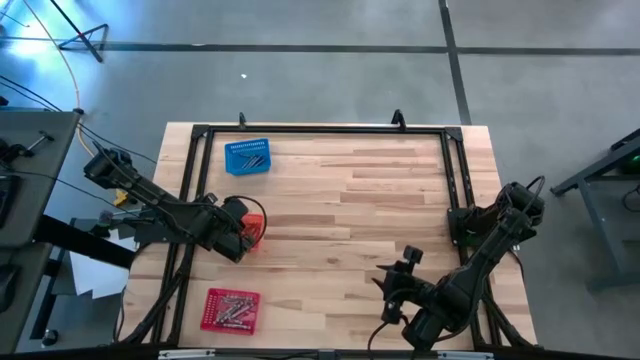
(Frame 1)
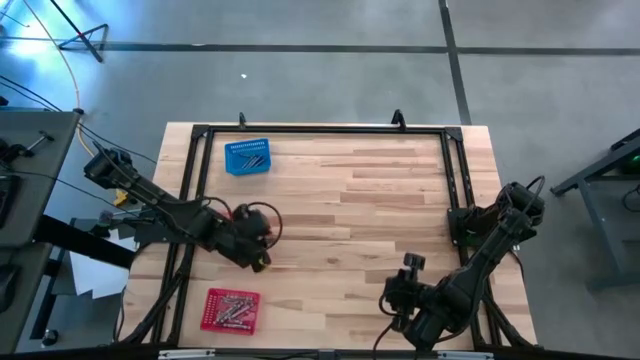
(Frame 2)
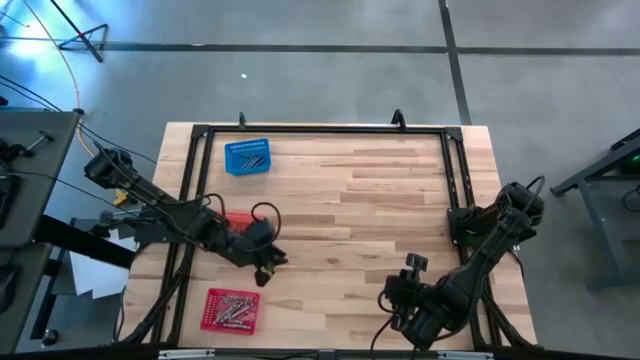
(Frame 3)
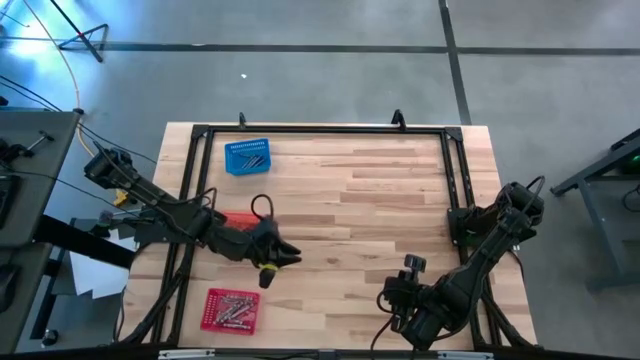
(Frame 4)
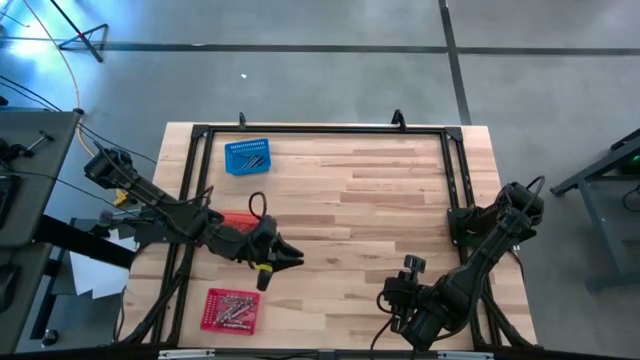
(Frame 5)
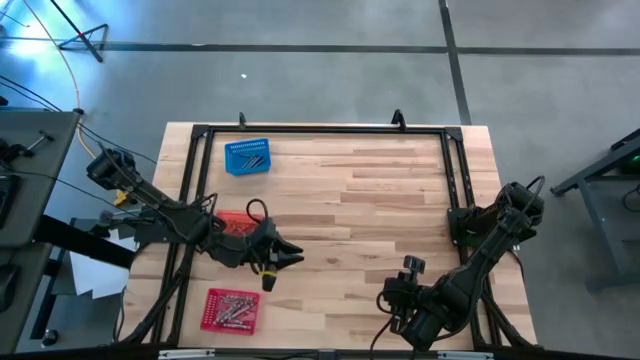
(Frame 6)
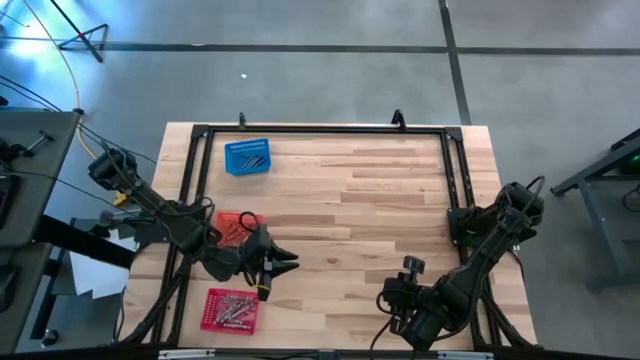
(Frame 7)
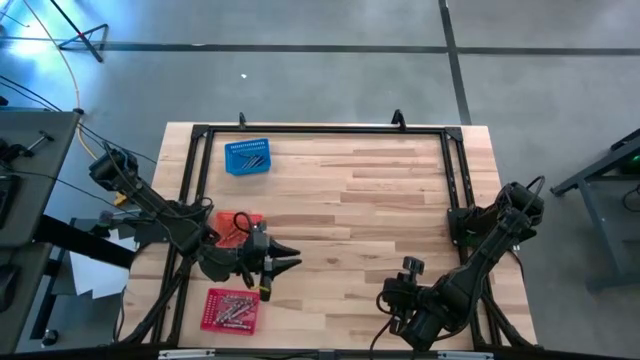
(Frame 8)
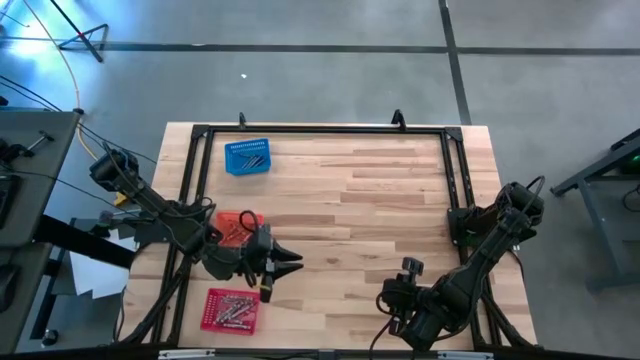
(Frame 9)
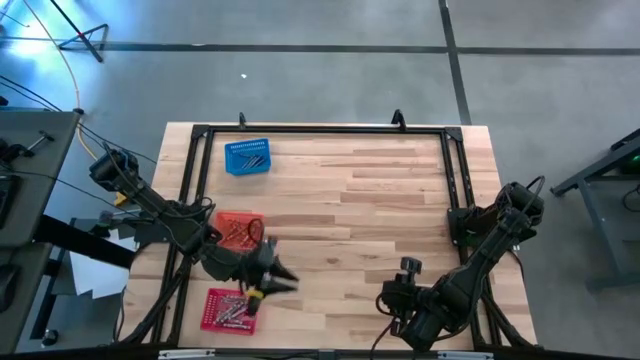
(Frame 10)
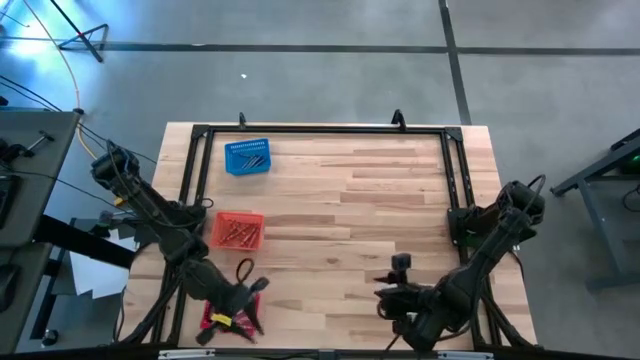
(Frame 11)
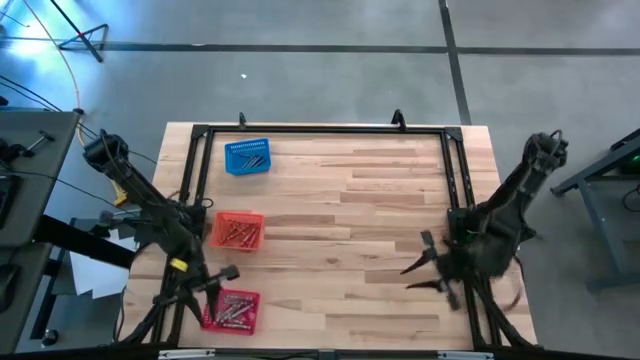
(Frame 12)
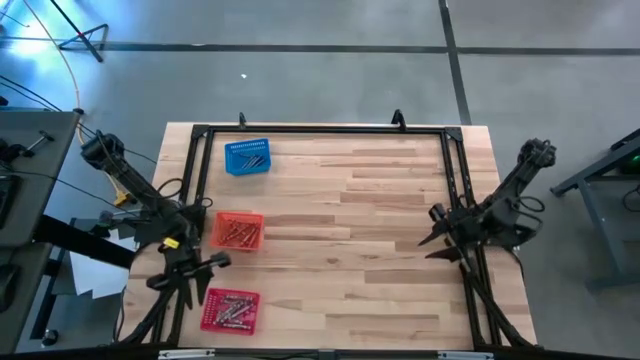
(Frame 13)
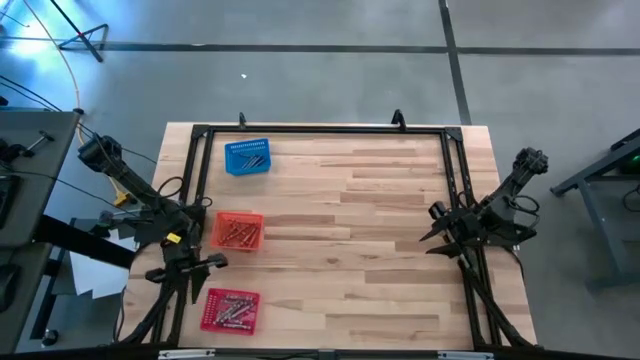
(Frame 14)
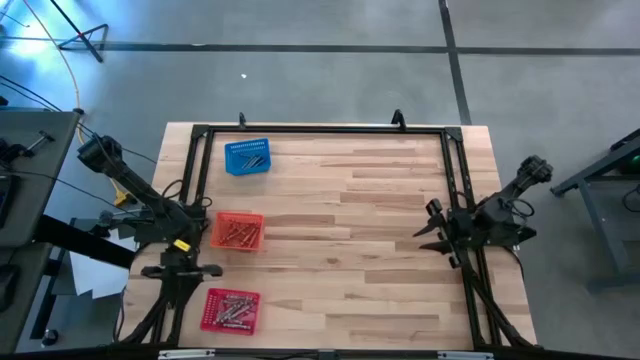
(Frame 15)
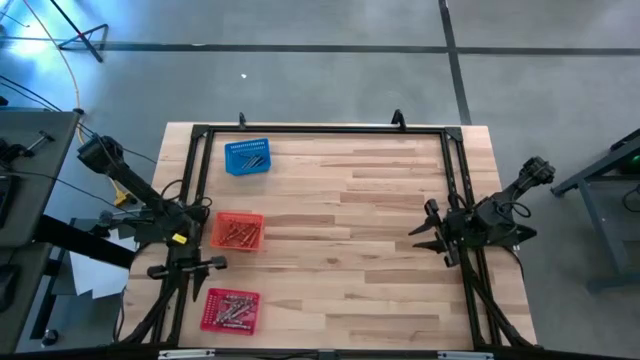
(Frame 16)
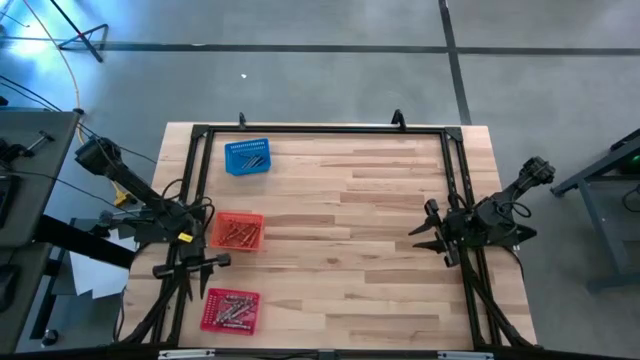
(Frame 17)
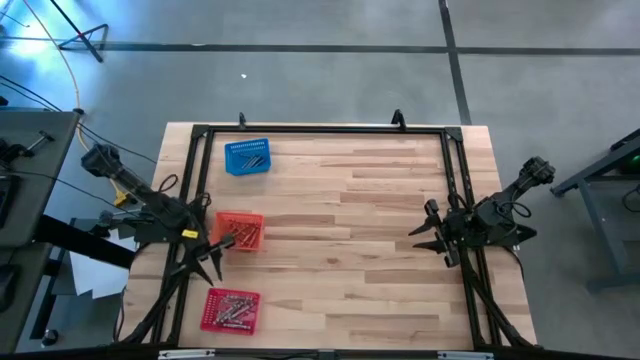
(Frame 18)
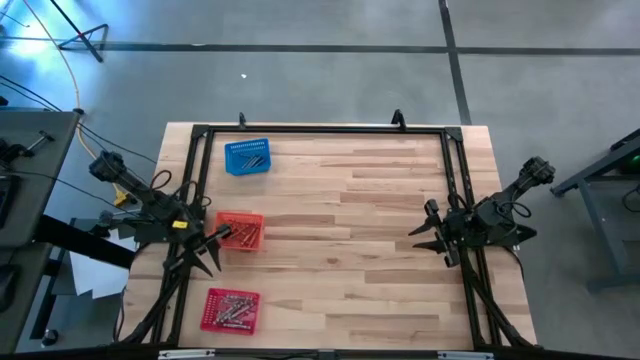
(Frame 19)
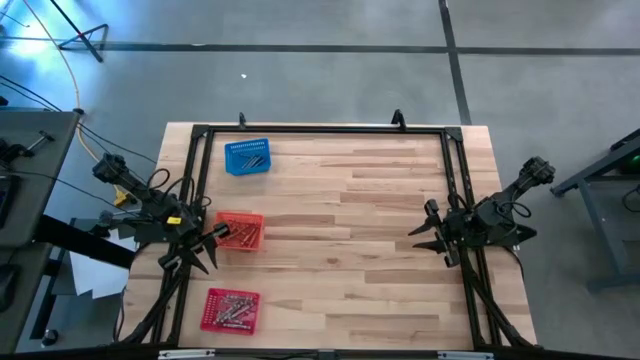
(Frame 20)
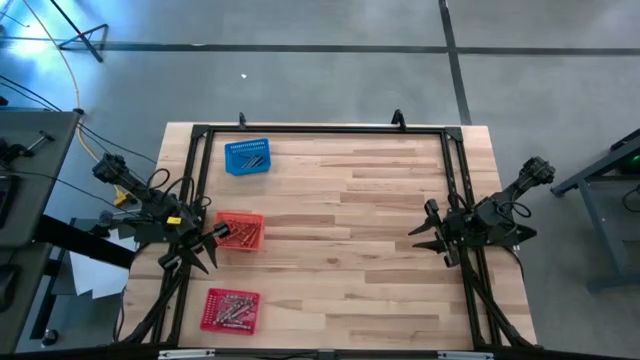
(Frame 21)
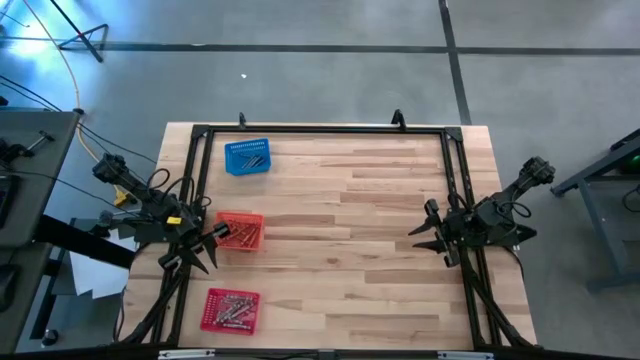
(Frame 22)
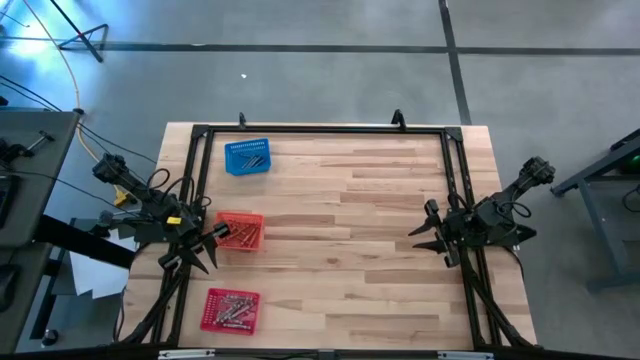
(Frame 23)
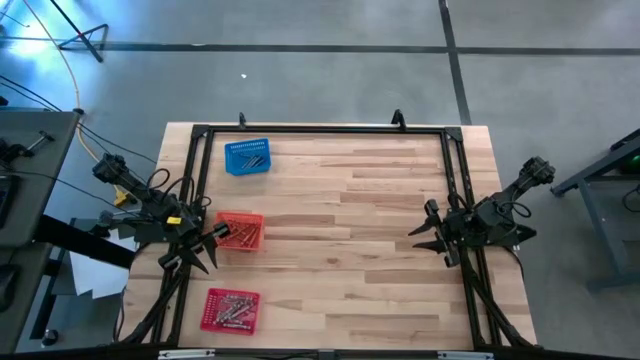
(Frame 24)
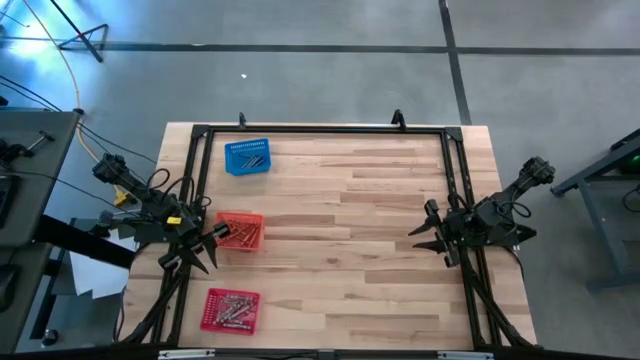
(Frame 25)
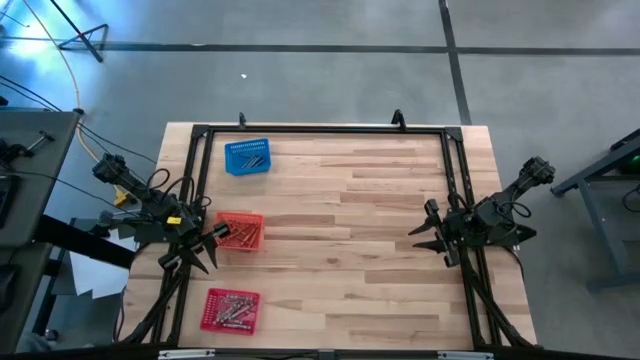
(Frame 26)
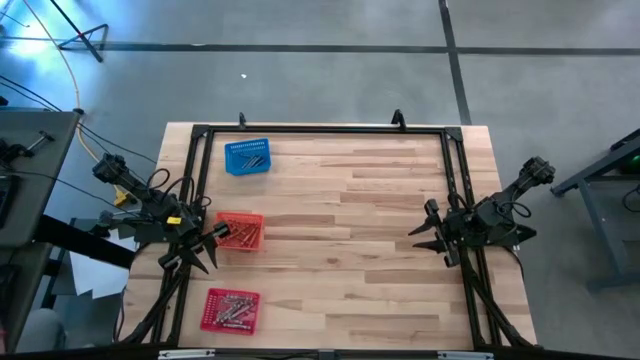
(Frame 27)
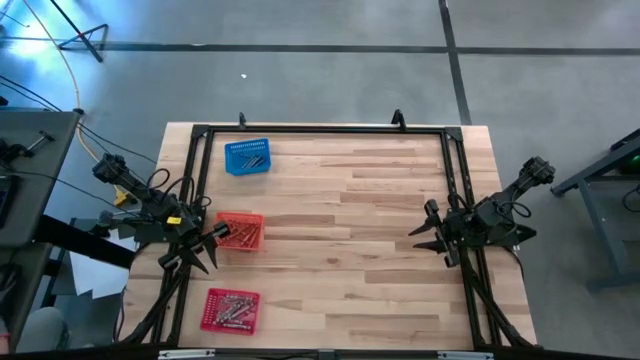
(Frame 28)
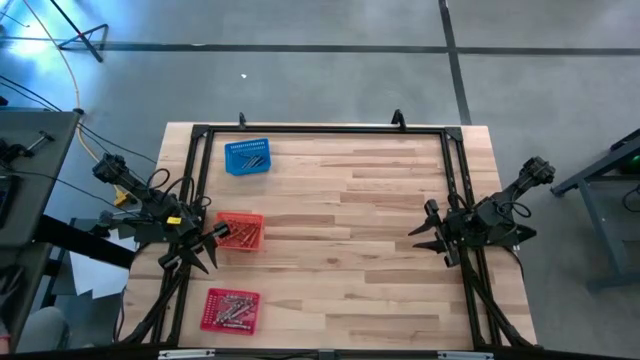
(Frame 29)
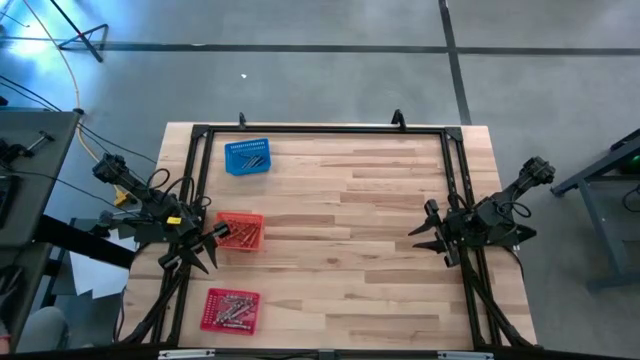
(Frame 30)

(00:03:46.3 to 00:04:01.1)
Task: Sort crayons
Return to Home Position

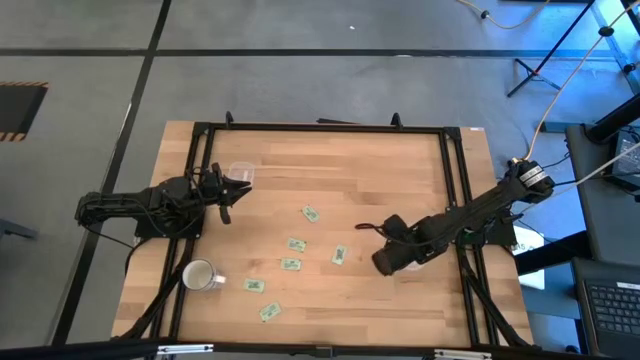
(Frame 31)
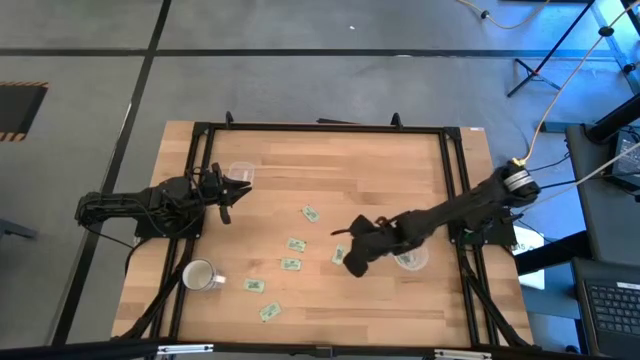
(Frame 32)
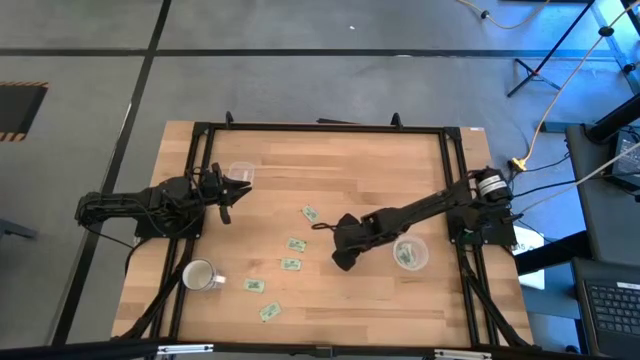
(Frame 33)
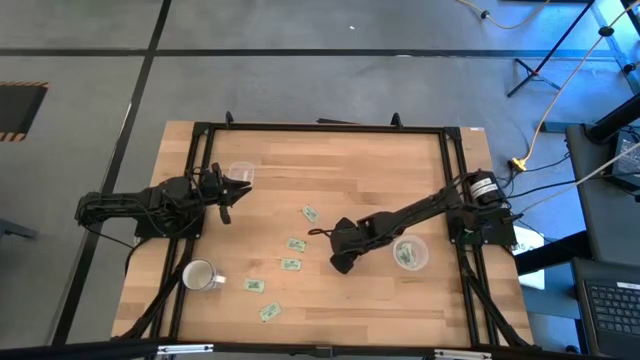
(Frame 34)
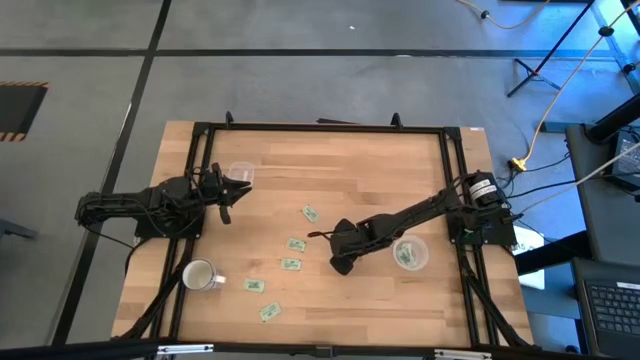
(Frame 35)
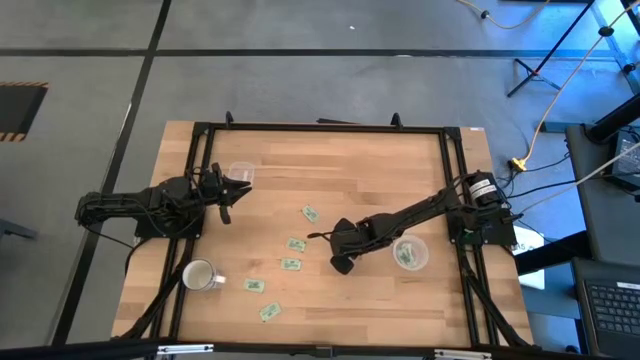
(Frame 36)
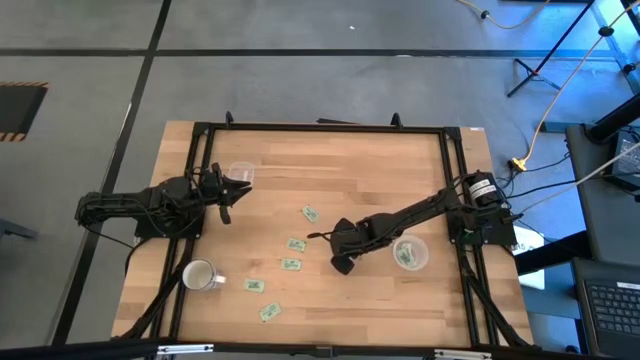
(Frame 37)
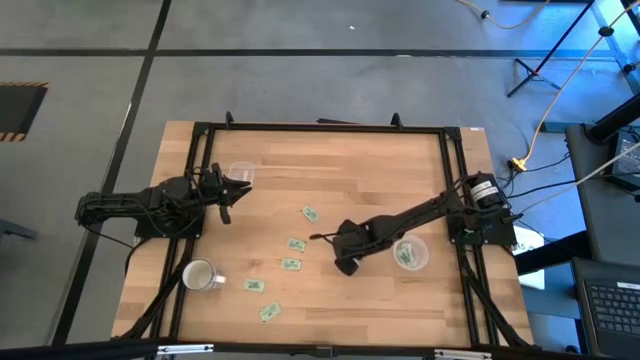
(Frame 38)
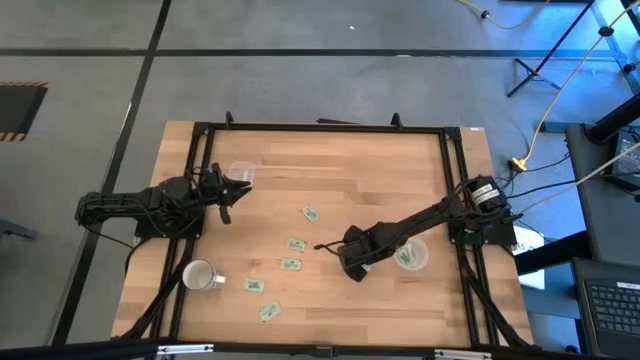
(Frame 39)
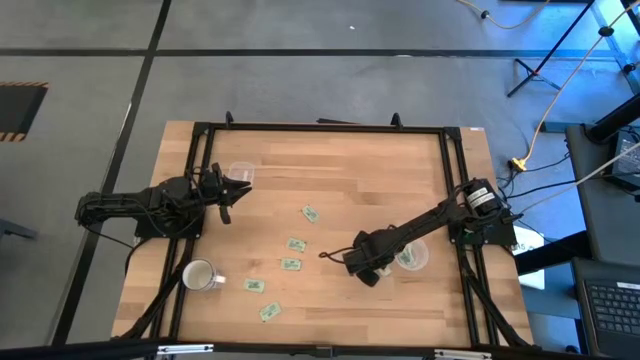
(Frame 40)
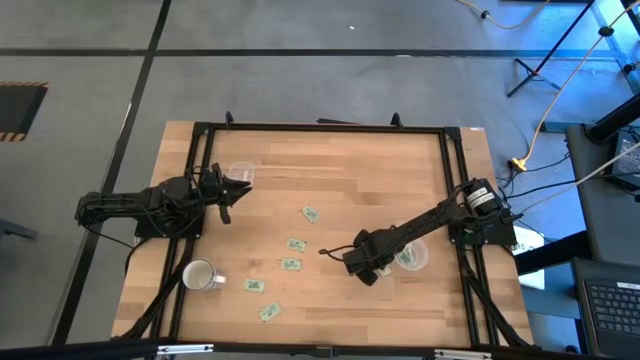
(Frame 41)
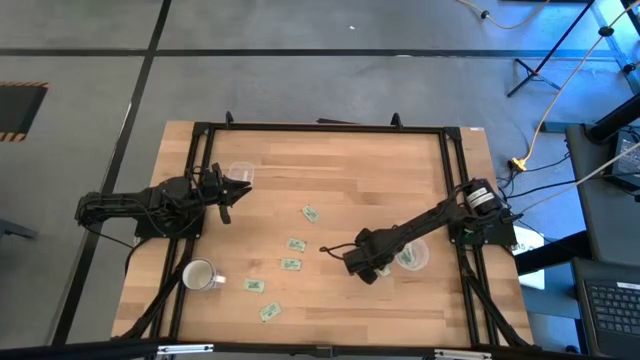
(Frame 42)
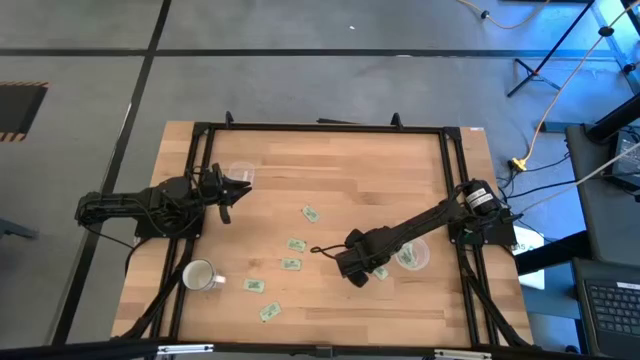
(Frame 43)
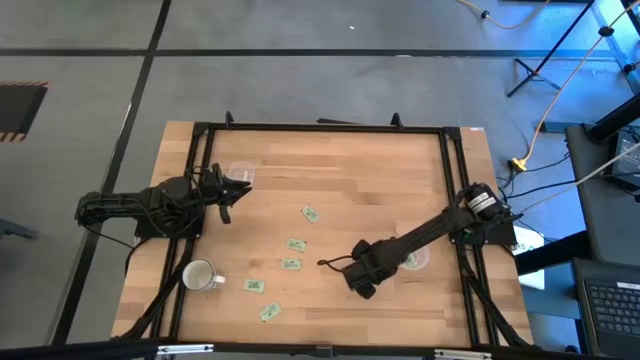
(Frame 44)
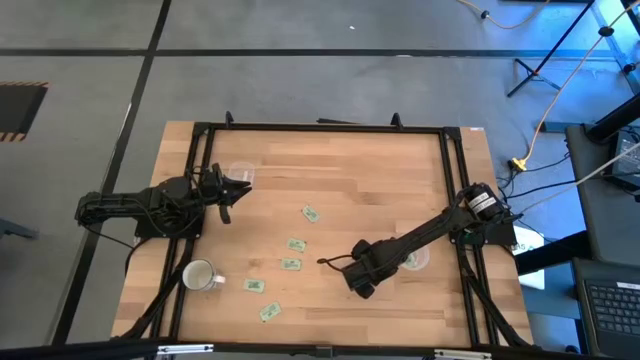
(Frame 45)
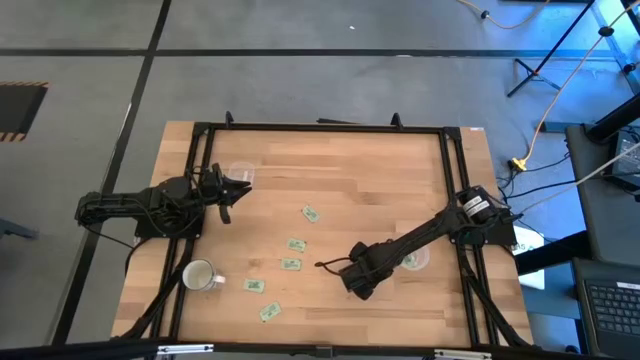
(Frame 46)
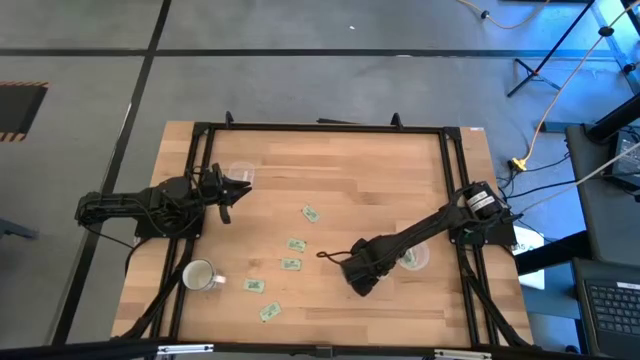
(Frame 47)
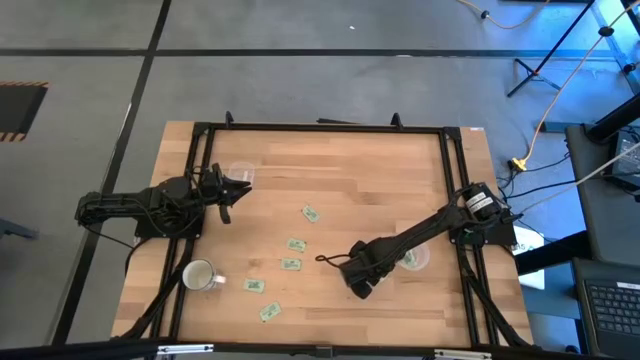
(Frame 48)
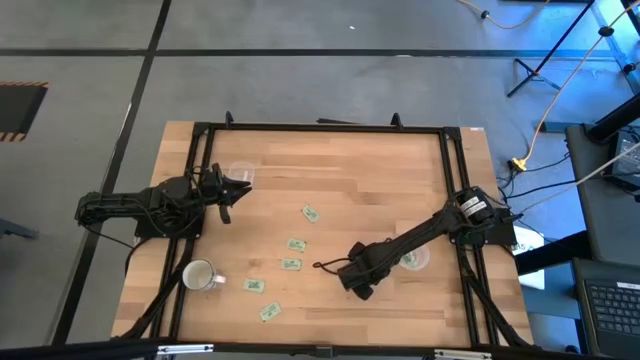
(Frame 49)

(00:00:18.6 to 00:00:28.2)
Task: Pick and place Stevia / Truvia into bins
Put the stevia packet into the round transparent container
